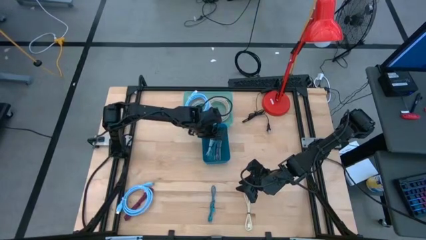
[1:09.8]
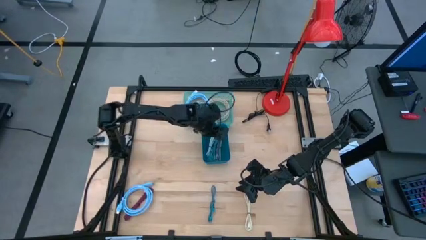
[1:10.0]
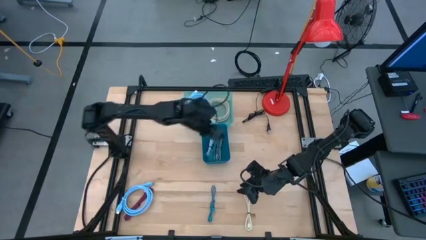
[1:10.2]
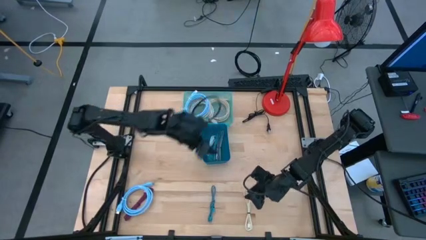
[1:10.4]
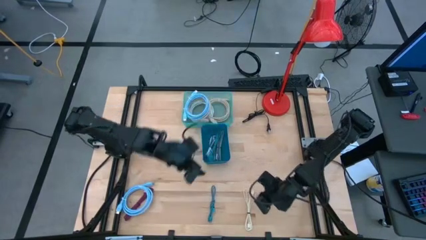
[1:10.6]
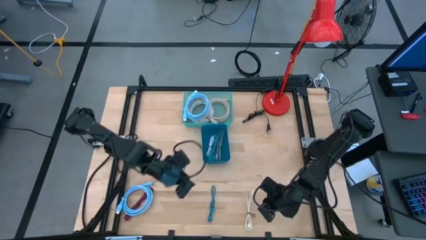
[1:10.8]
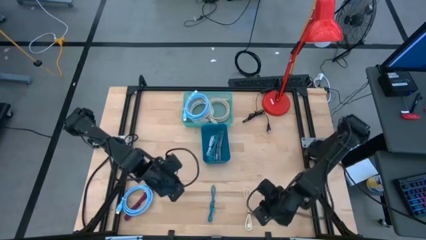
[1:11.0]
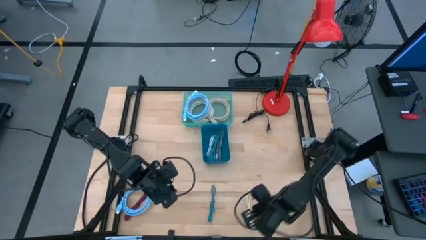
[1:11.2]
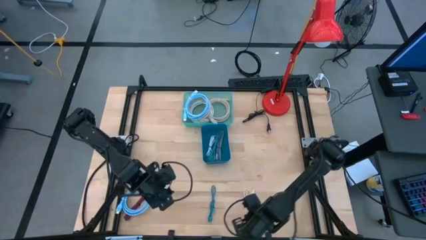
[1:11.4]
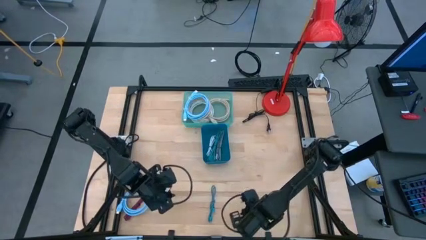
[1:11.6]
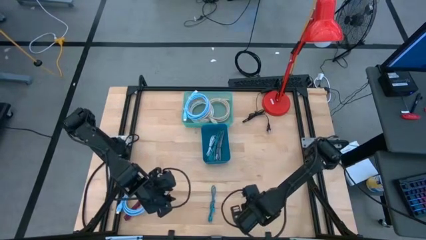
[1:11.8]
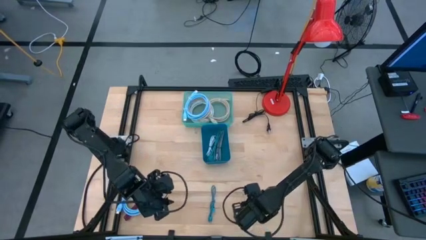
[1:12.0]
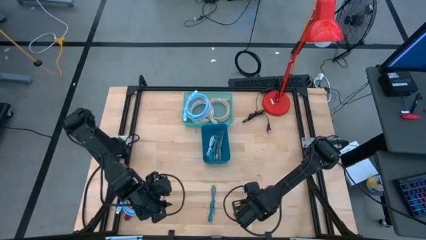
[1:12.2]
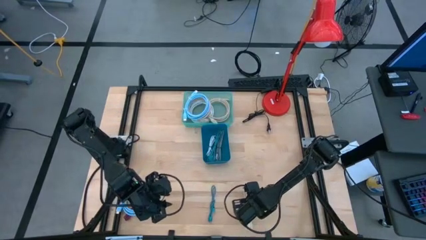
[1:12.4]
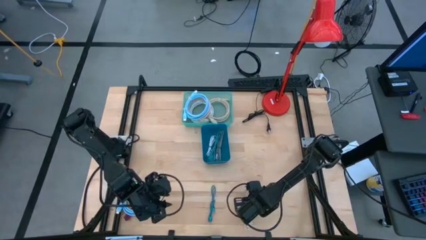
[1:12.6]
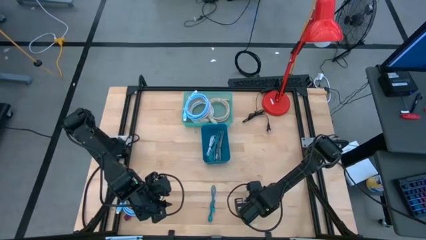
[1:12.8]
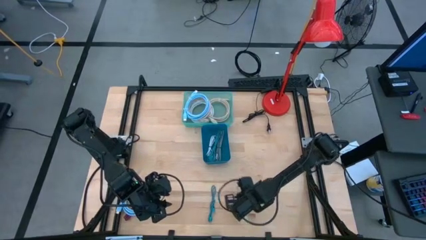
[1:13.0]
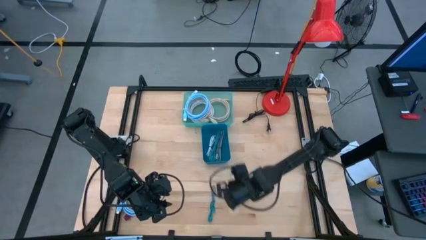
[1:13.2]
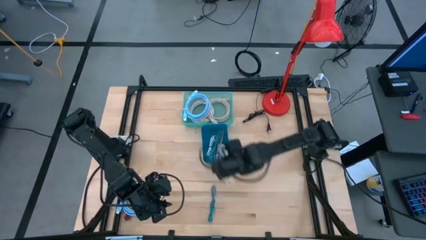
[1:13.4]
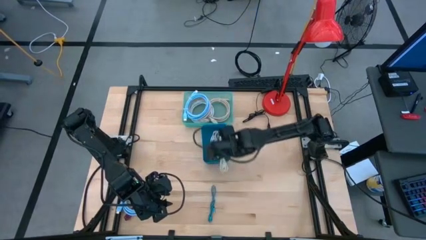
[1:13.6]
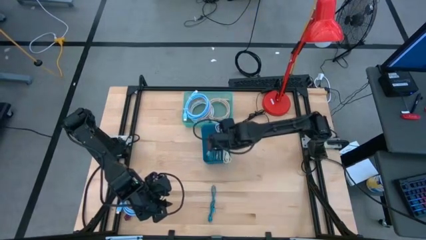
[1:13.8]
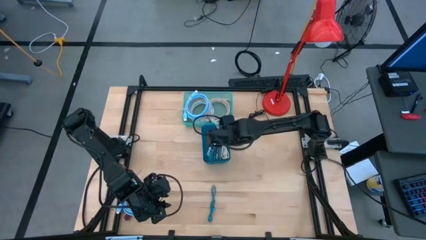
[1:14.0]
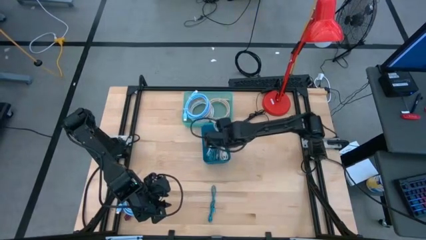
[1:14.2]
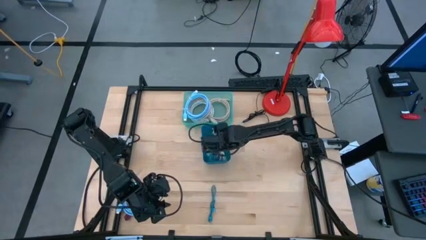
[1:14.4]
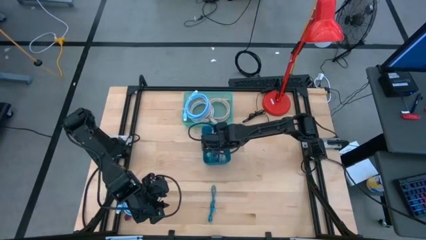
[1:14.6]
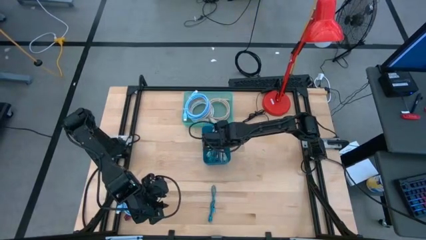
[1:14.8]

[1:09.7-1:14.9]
Task: Pick & Place USB Port
Put the white charger cable into the blue bin

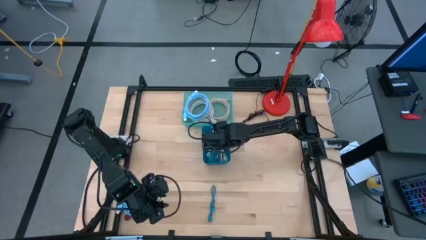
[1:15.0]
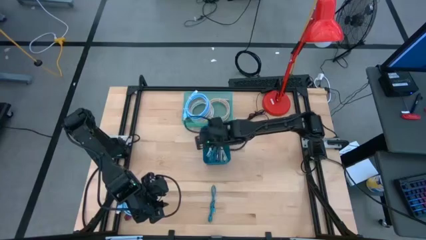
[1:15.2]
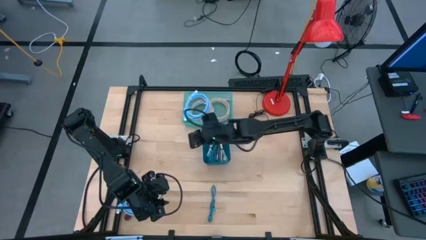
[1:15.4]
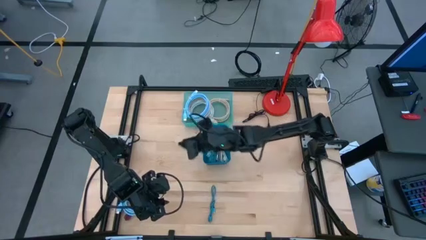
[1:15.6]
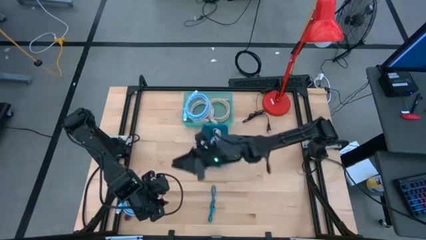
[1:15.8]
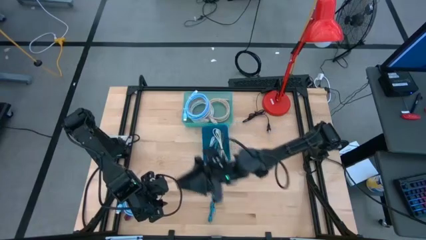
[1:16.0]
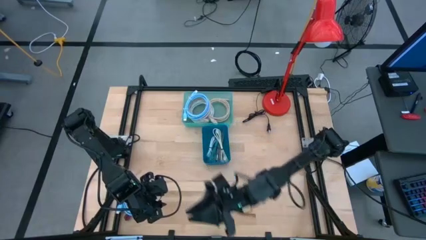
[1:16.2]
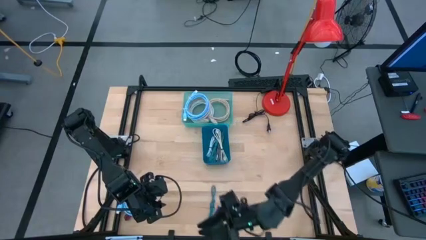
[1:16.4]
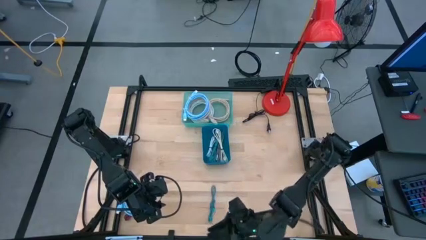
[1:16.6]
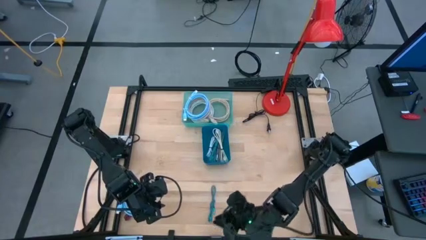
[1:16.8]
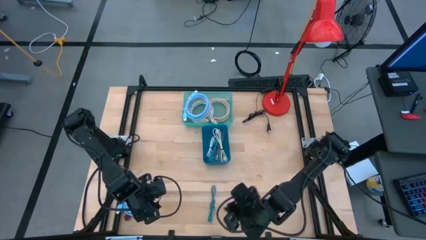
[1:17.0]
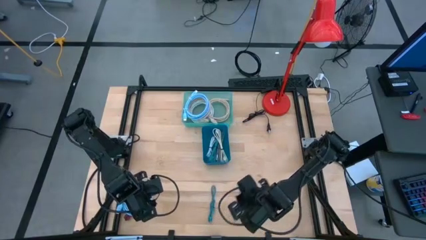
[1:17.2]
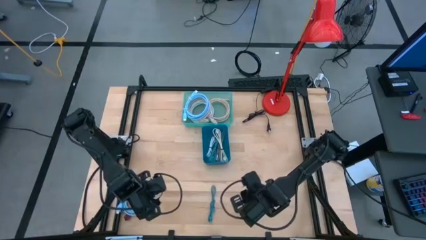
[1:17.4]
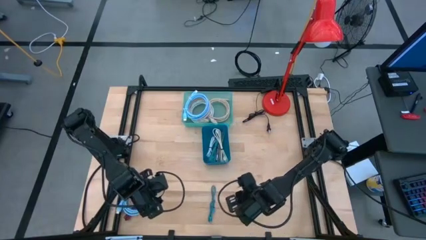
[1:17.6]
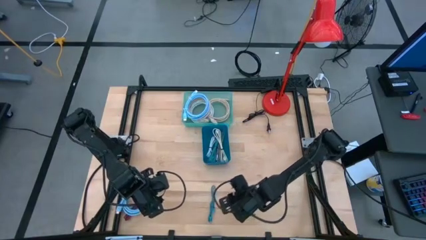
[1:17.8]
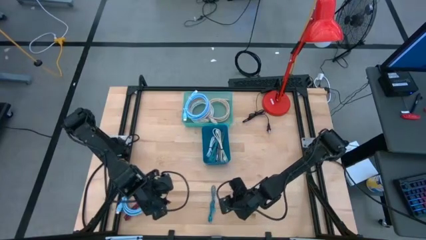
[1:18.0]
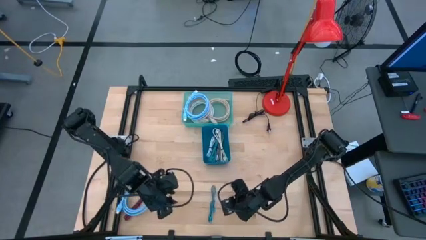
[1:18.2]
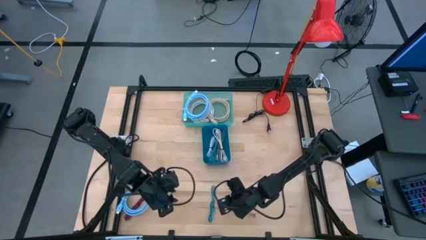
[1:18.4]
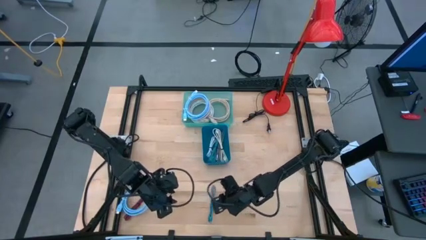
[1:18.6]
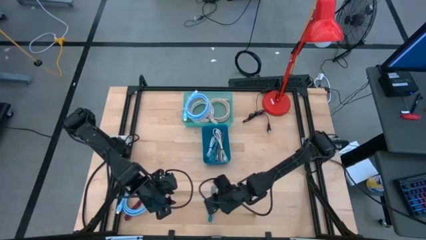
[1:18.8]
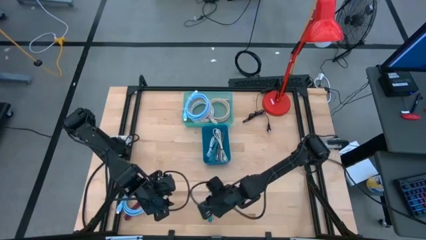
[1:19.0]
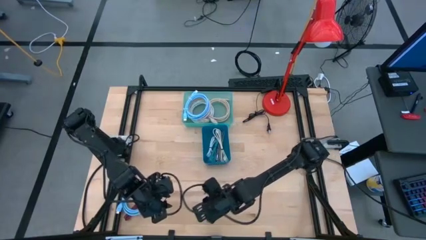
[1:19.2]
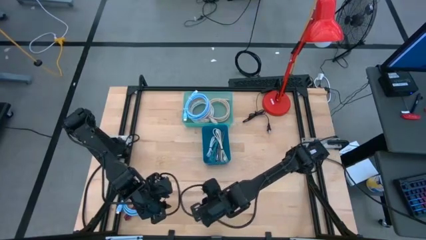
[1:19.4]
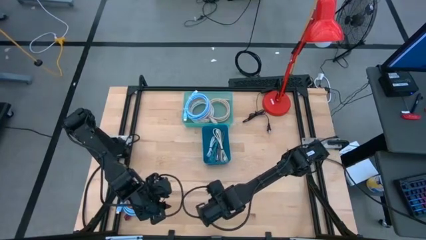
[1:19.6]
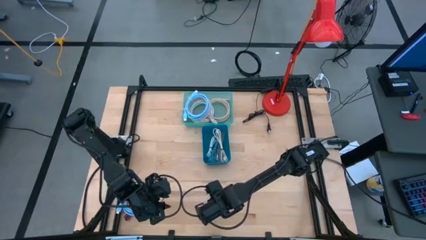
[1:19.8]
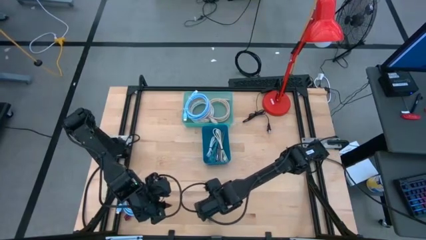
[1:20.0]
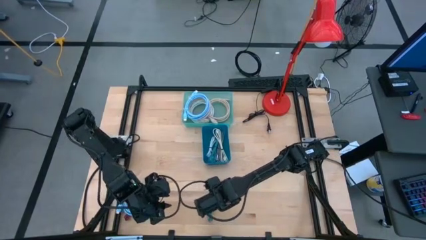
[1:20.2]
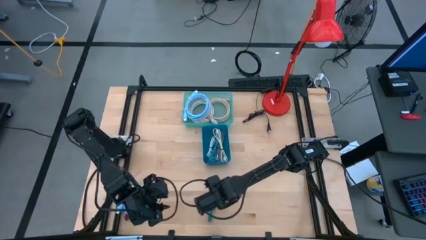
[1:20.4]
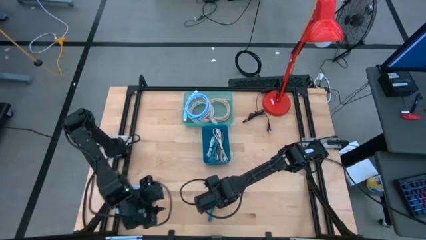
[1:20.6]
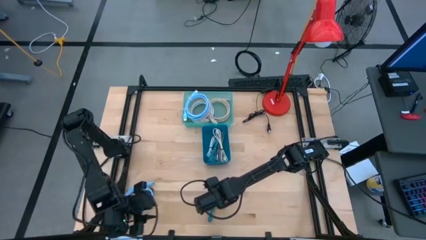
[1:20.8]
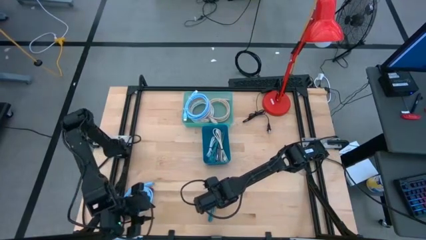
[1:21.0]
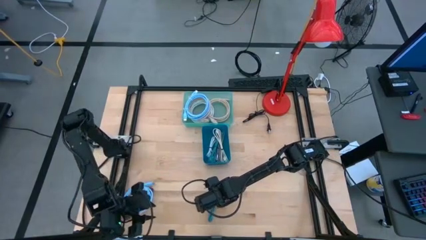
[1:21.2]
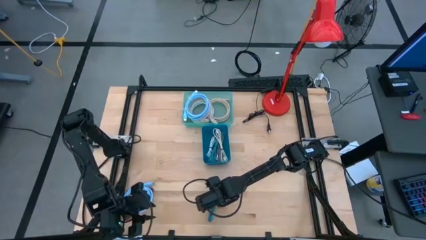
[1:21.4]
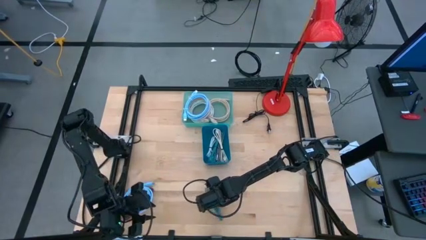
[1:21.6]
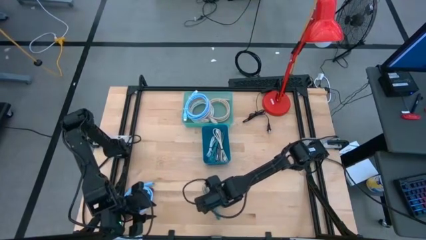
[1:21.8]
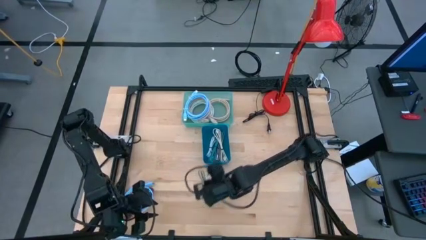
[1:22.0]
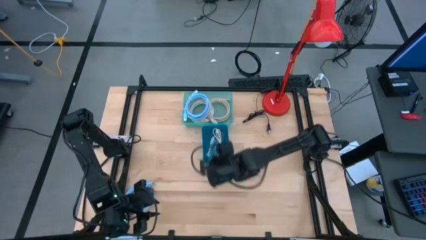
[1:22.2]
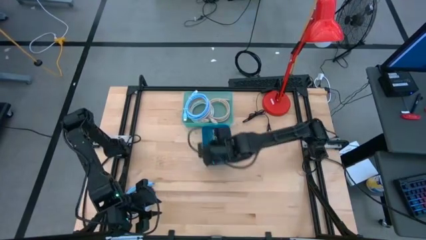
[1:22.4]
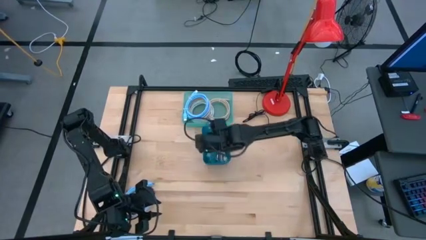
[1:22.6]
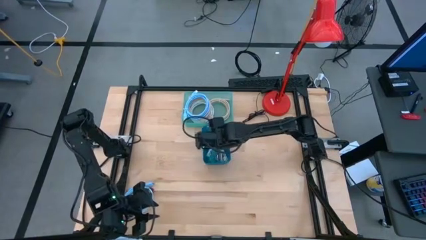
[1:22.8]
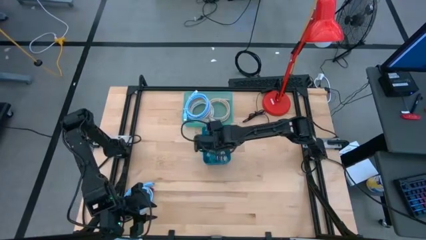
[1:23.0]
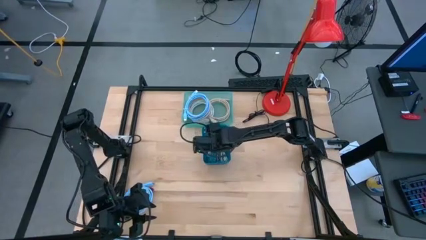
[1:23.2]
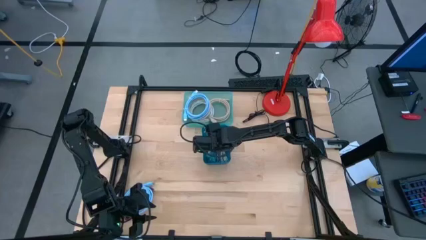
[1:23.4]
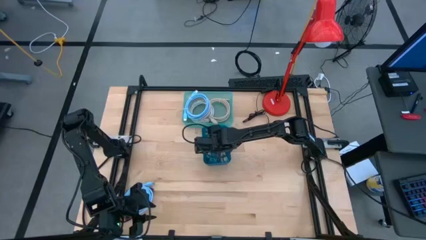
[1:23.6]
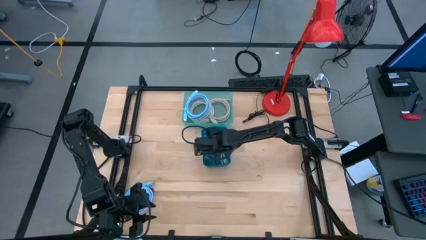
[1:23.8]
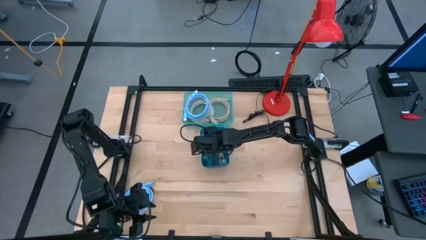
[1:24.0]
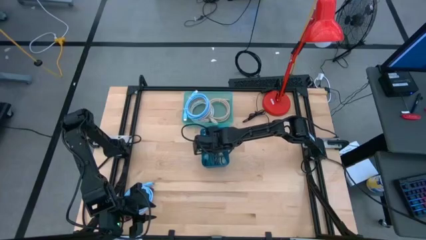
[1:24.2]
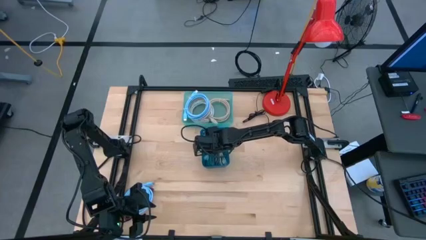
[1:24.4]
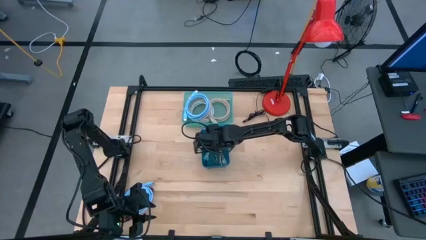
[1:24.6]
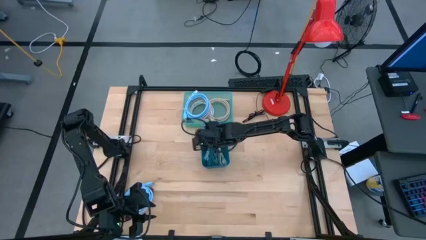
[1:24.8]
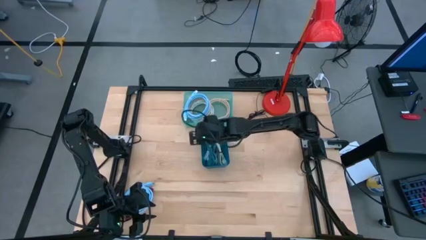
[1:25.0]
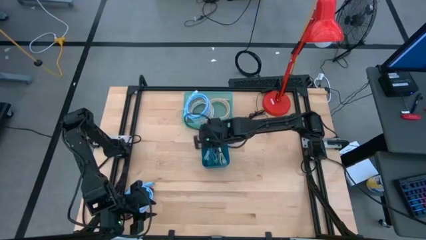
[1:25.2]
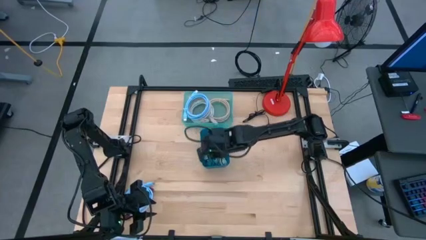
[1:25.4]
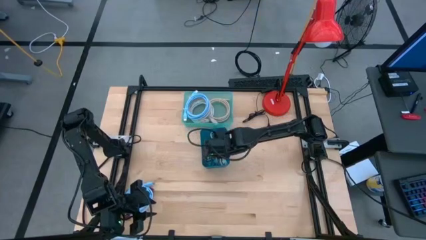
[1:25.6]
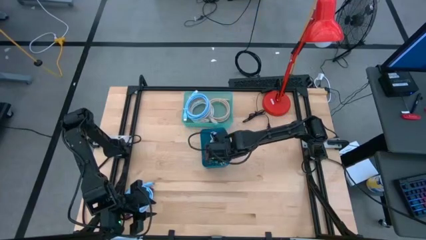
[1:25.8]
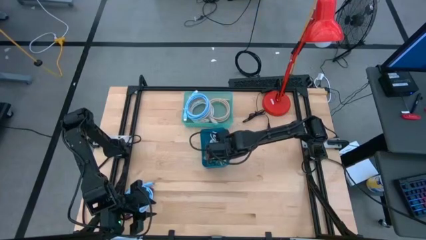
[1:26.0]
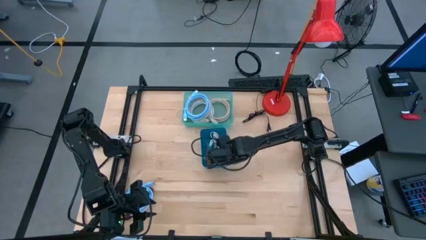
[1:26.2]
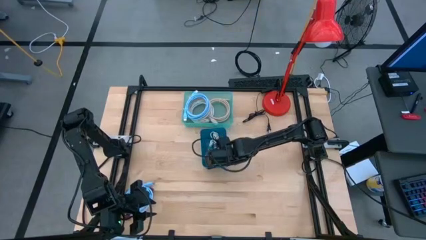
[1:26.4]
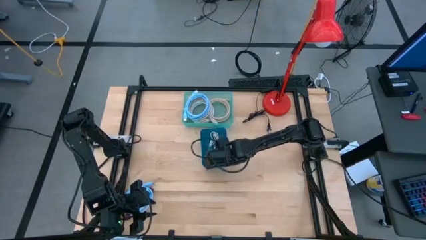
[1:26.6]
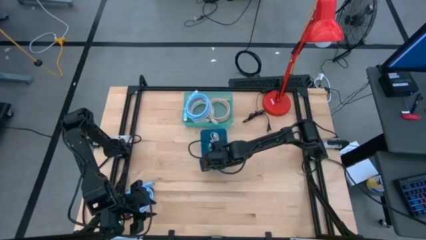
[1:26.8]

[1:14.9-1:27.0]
Put the blue charger cable into the blue bin
